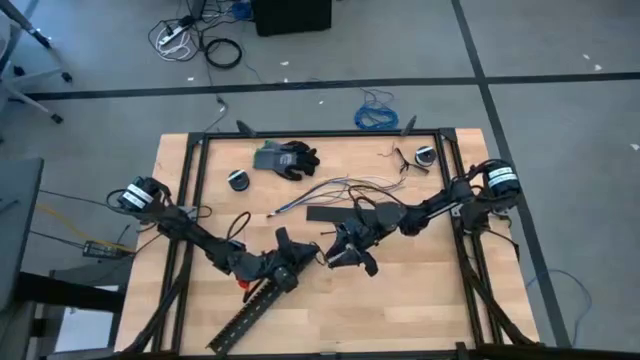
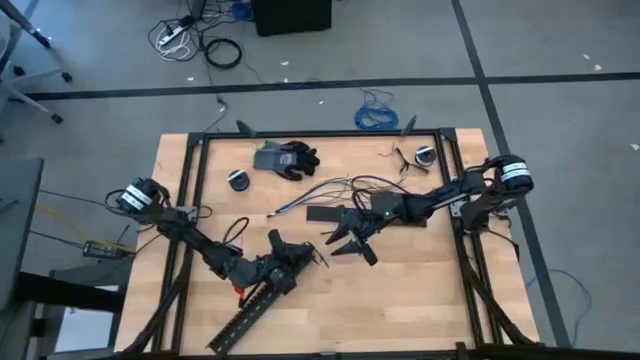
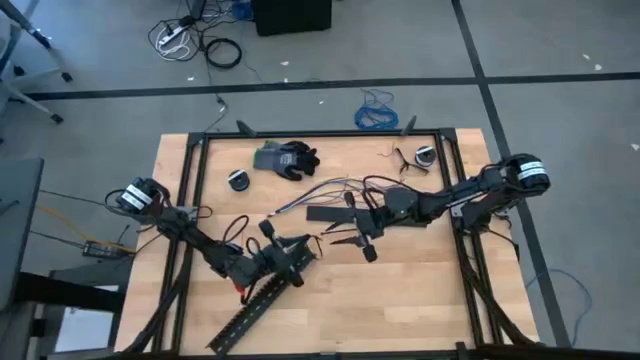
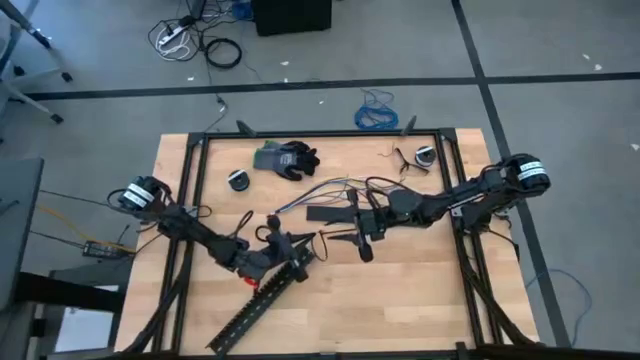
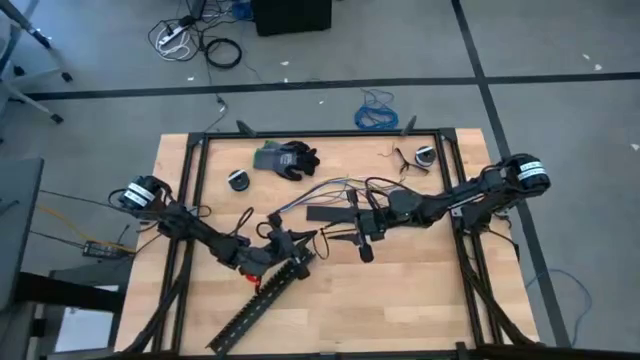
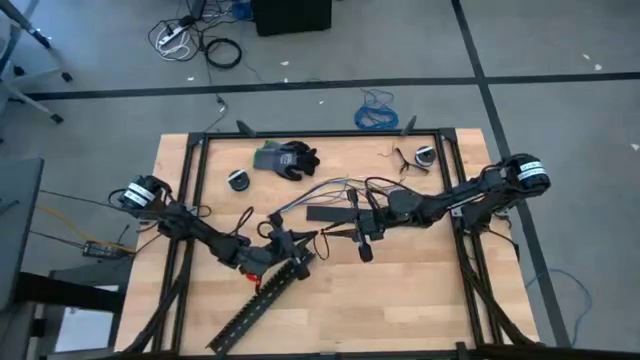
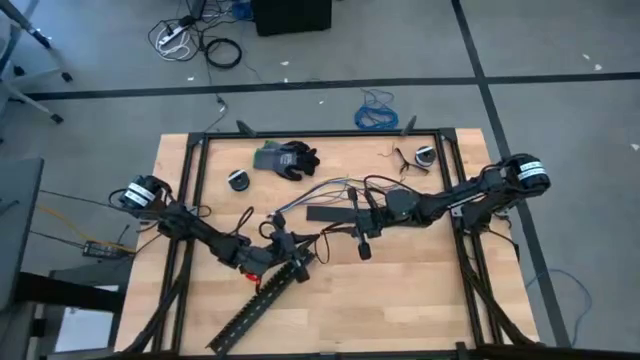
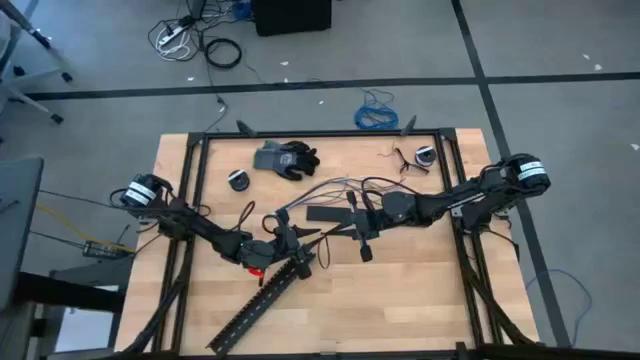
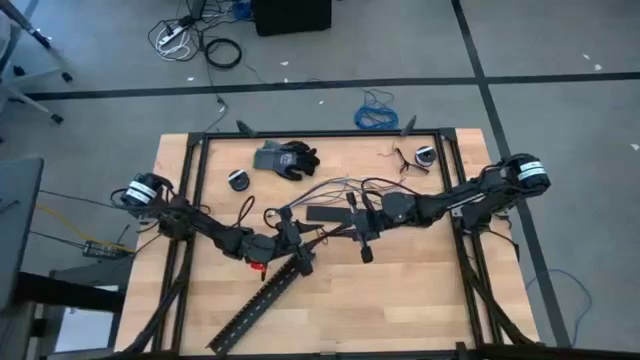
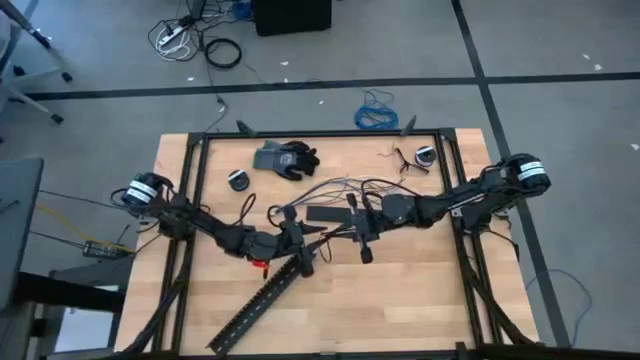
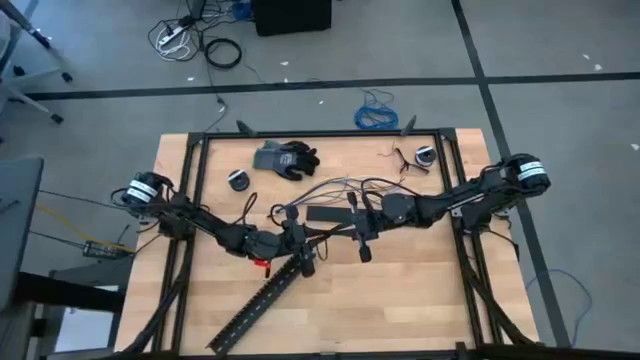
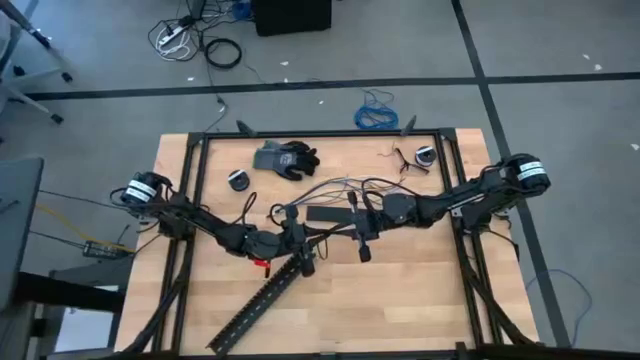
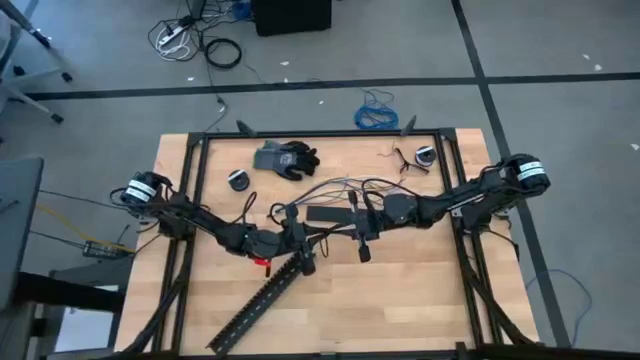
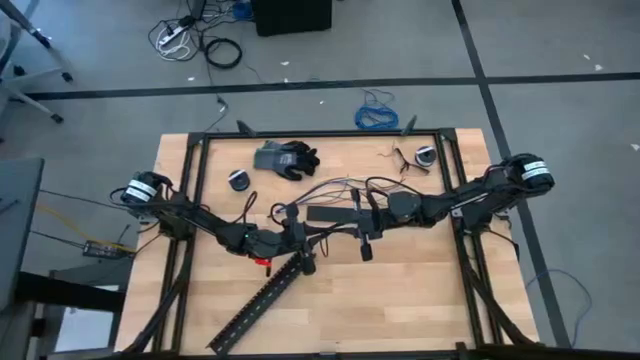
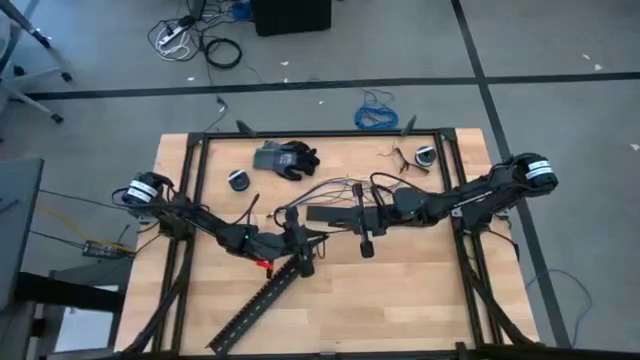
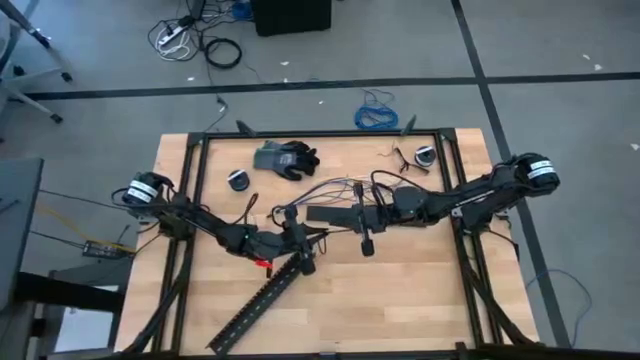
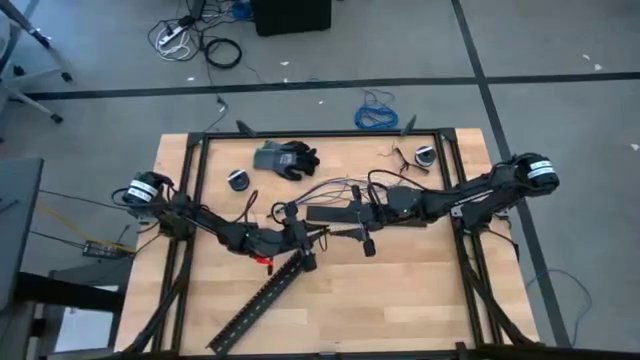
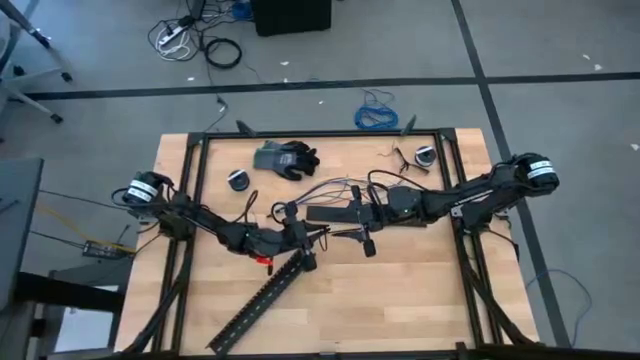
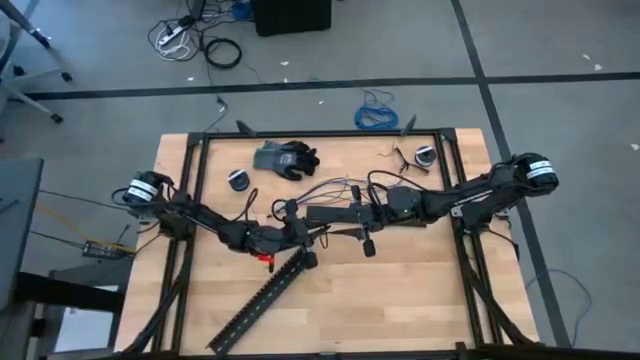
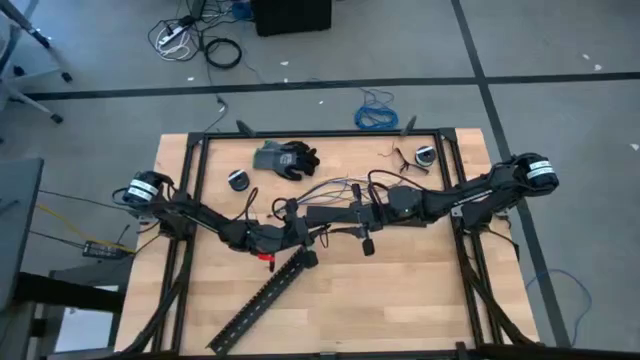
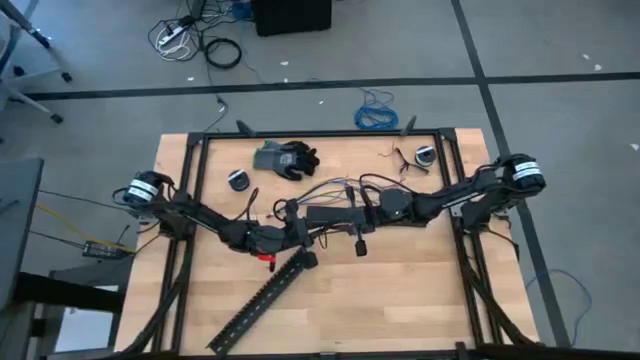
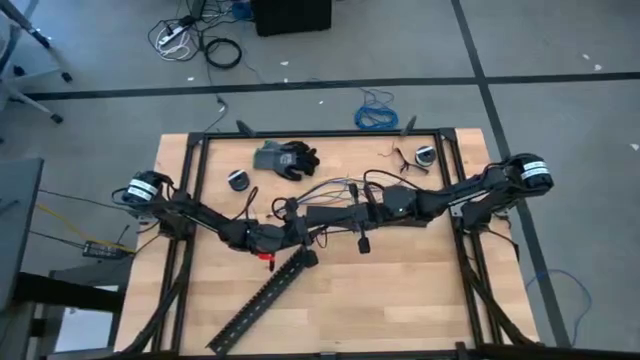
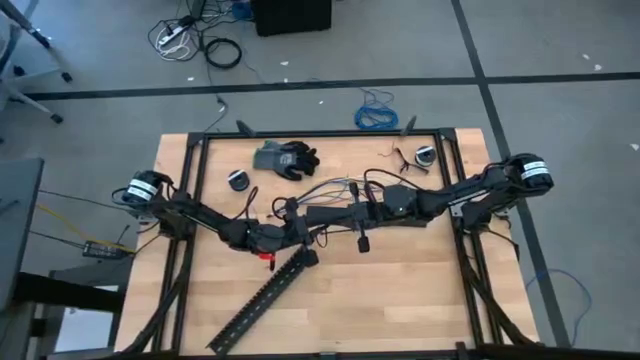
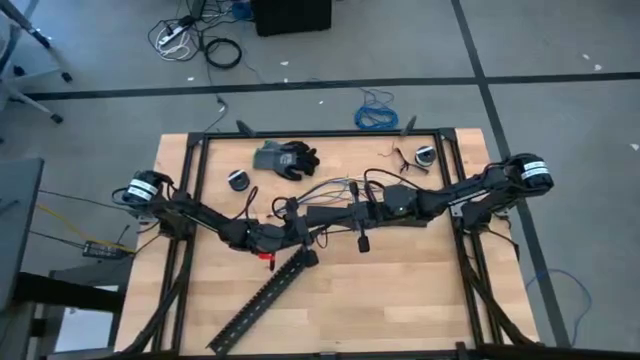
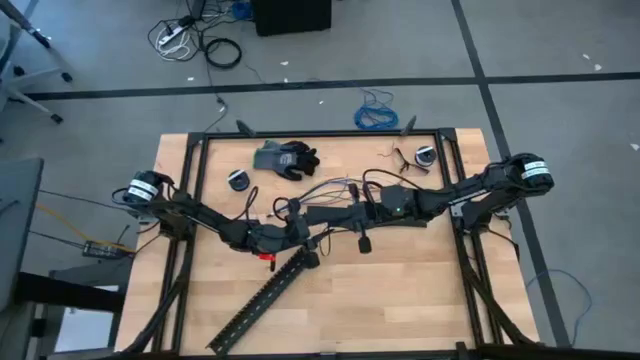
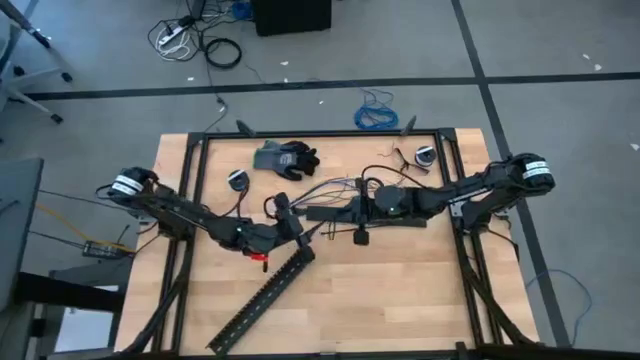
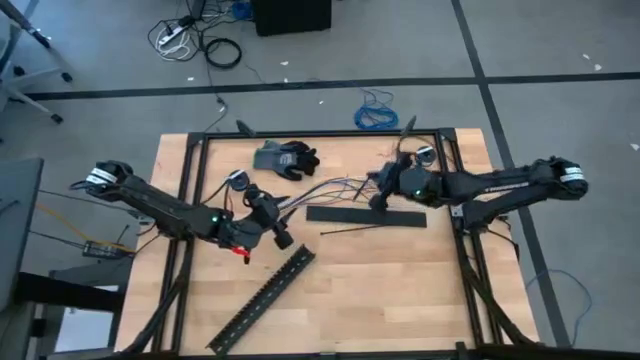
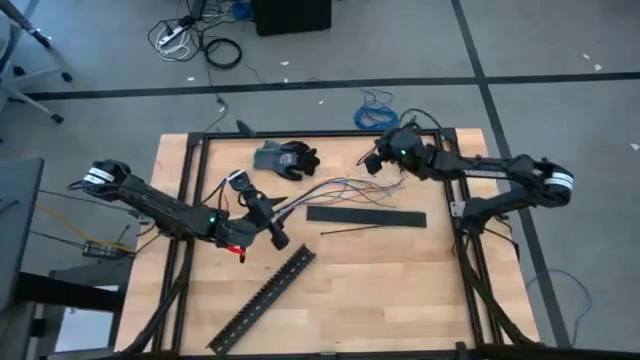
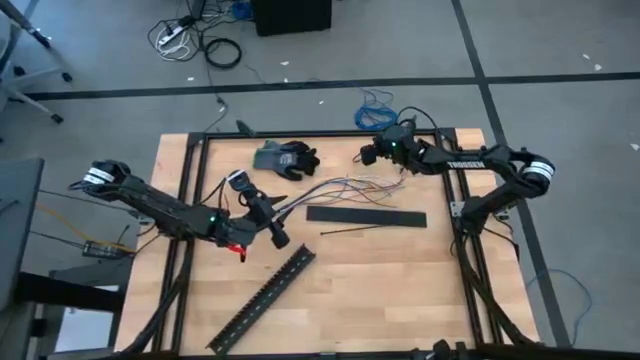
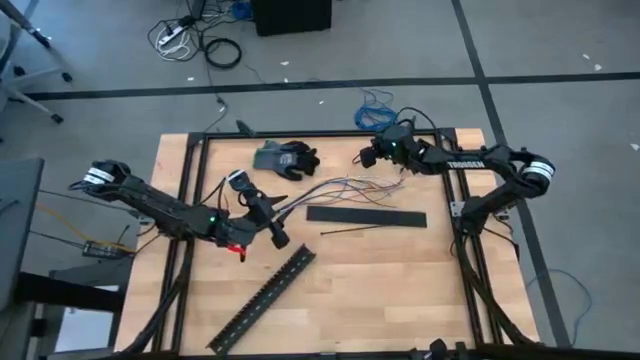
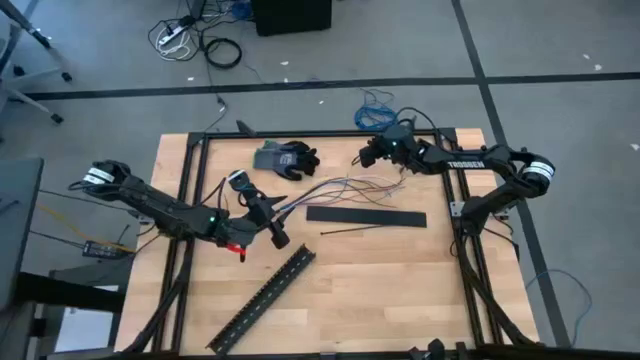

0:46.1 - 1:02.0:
Task: Ziptie cables
Insert the black zip tie into the locking head

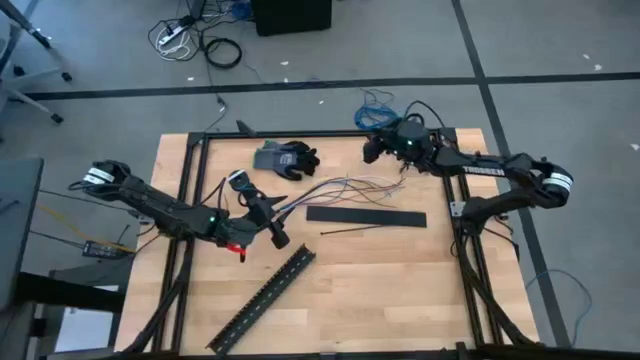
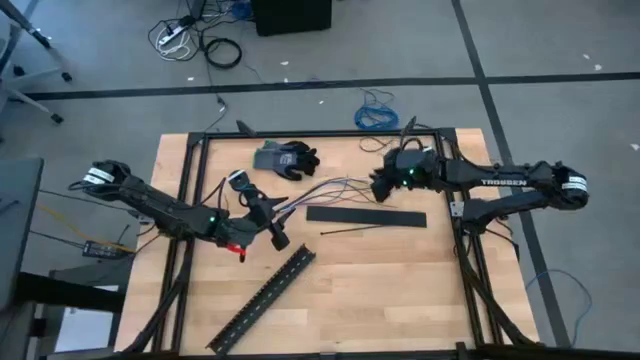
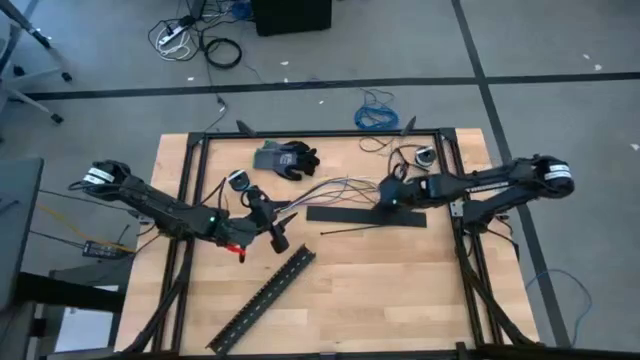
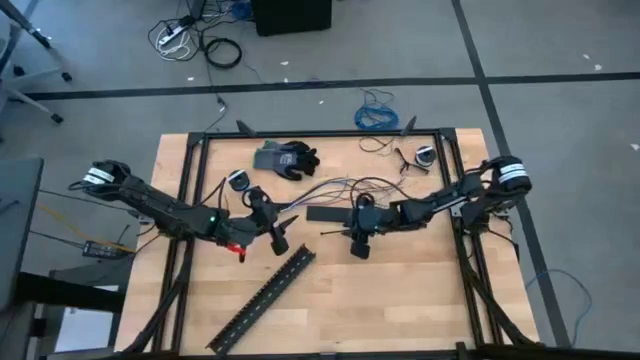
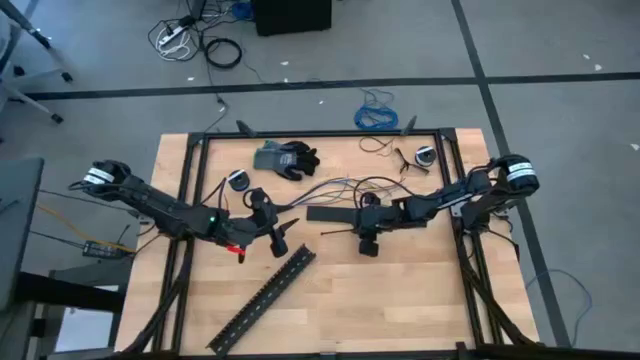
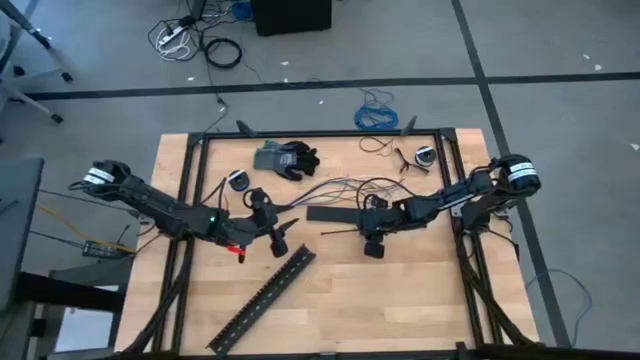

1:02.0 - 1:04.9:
Wrap the cable wires with the black zip tie

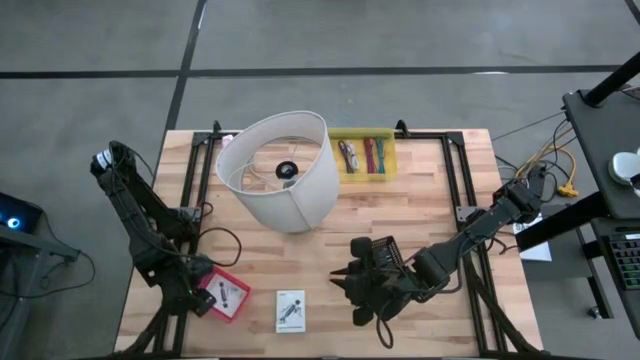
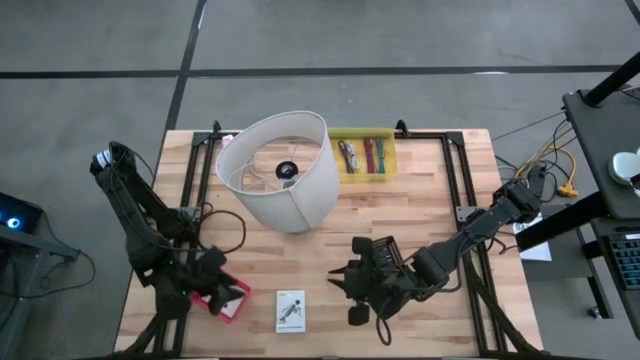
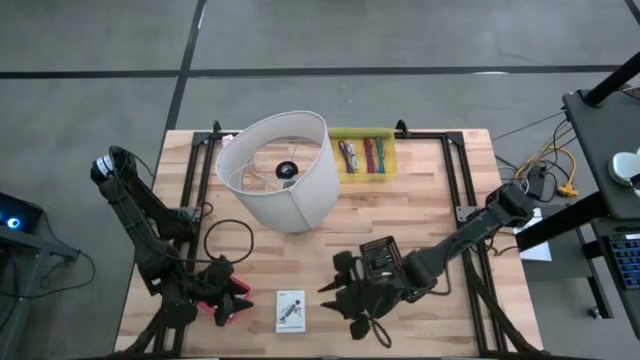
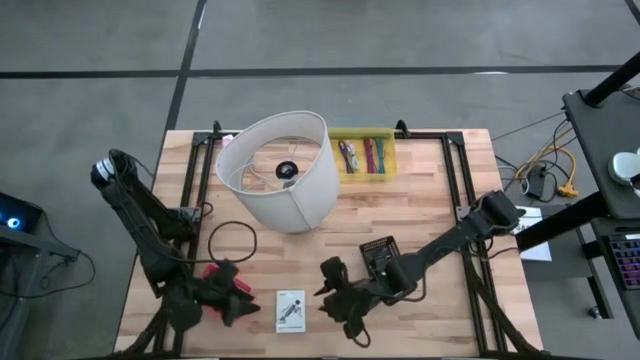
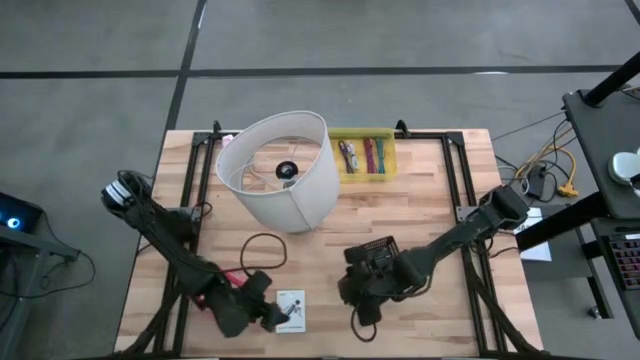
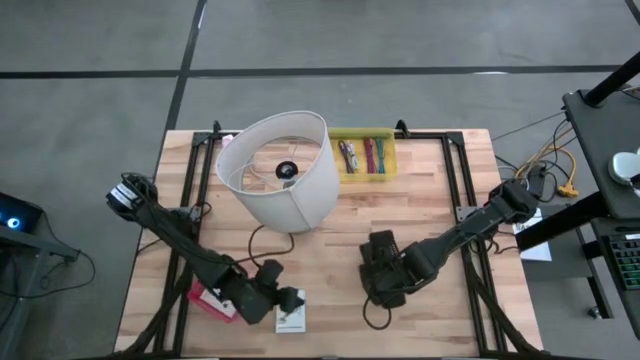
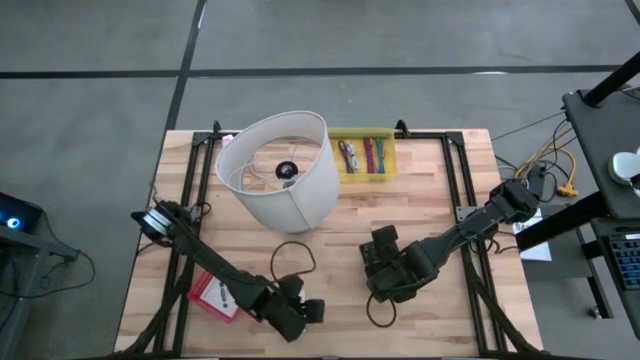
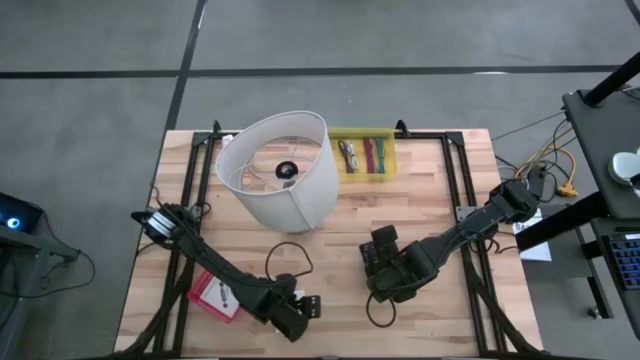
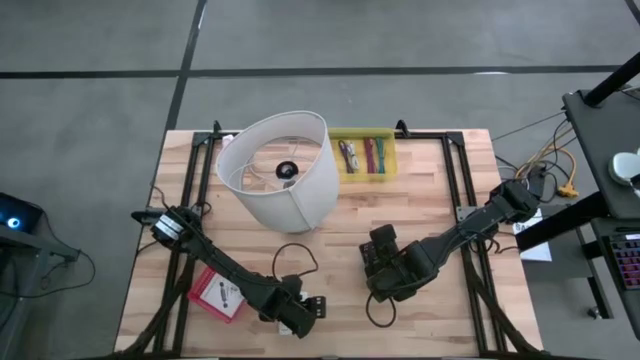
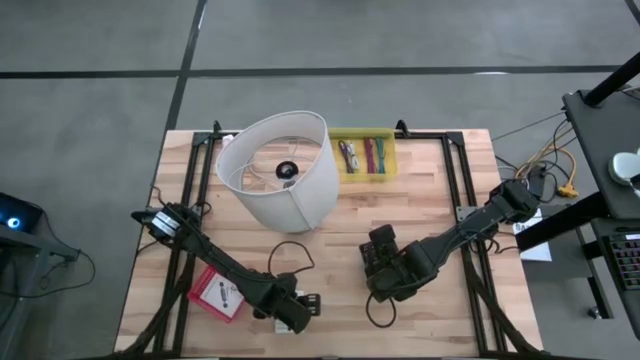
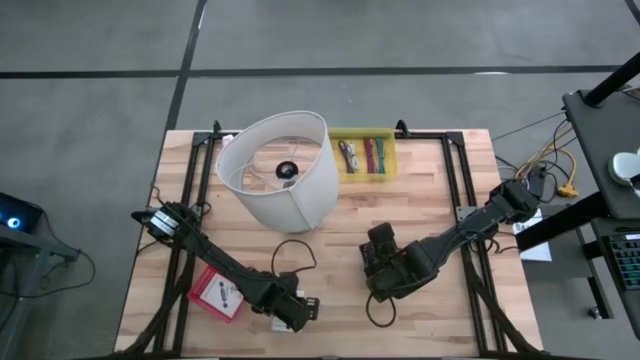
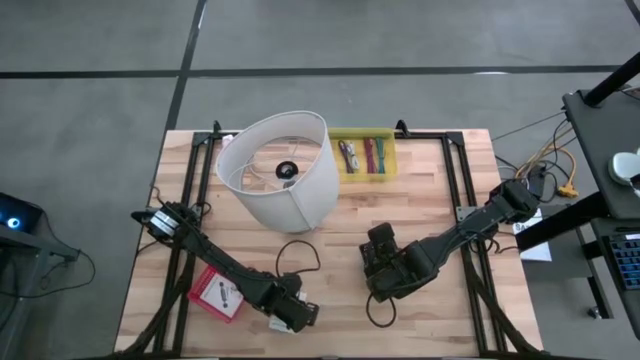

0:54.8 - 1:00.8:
Task: Pick and place items into bin
Put the white box into the red bin
